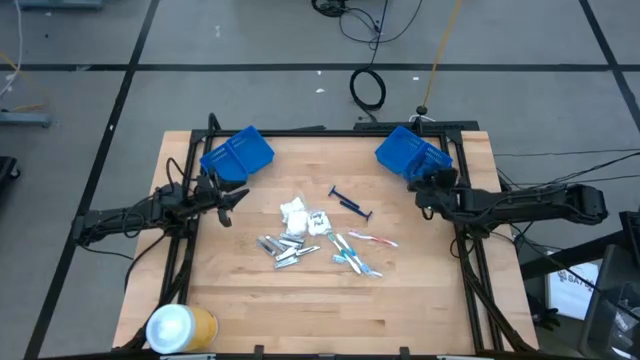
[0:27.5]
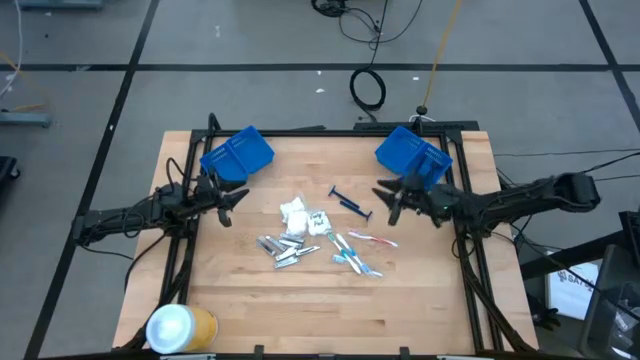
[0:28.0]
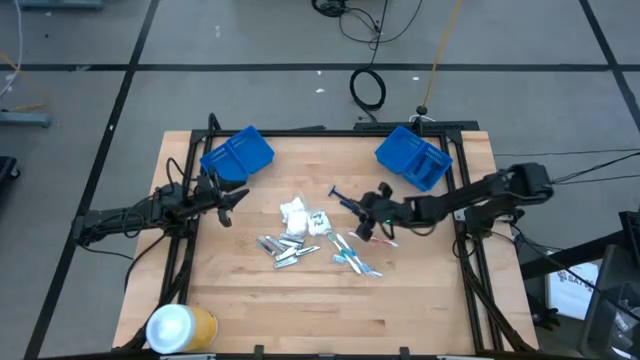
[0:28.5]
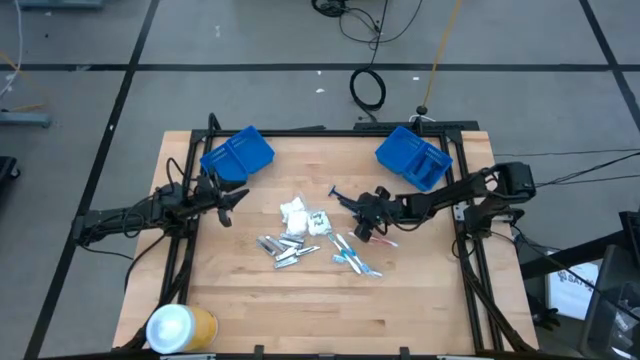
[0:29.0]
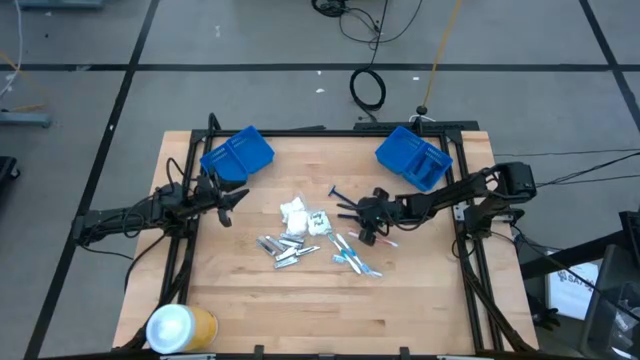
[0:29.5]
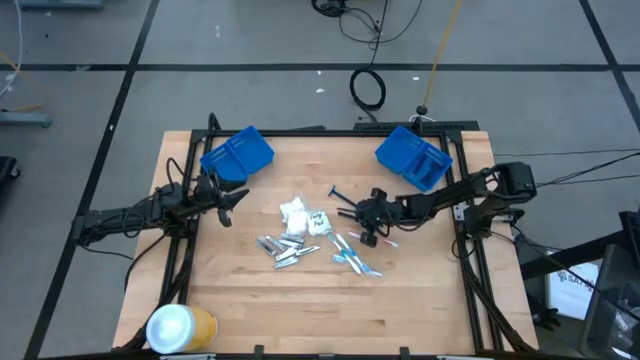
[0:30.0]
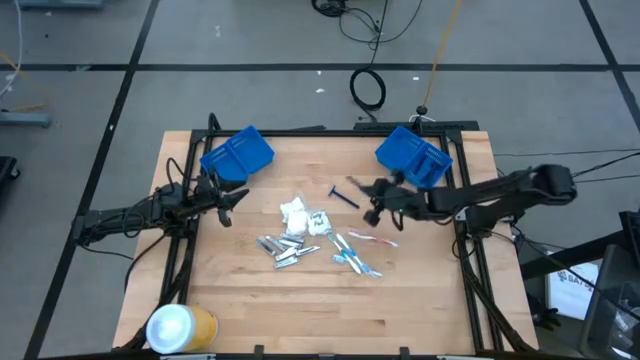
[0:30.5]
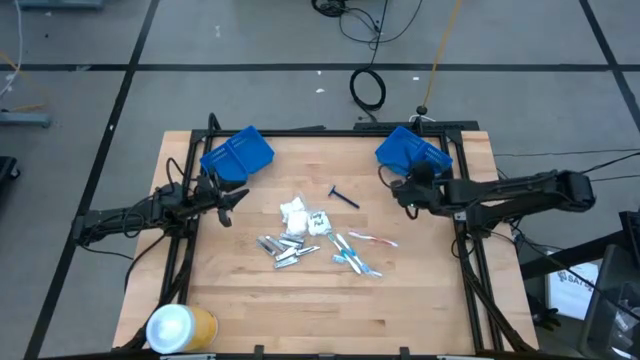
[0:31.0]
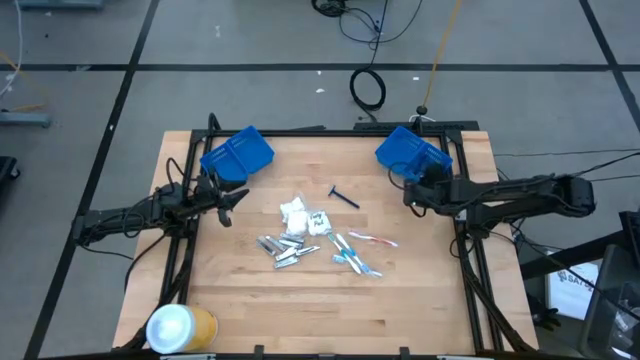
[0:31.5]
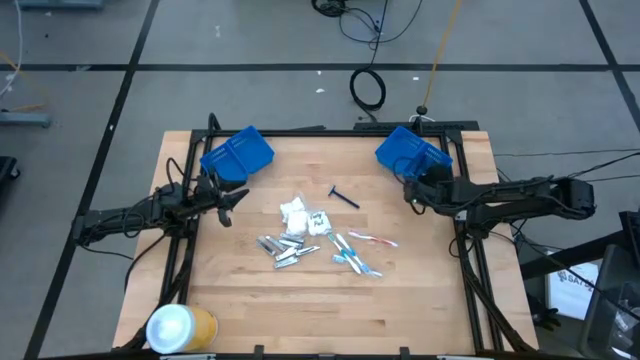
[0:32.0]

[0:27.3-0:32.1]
Task: Pick & Place Travel size toiletries
Put the blue razor into the right blue basket

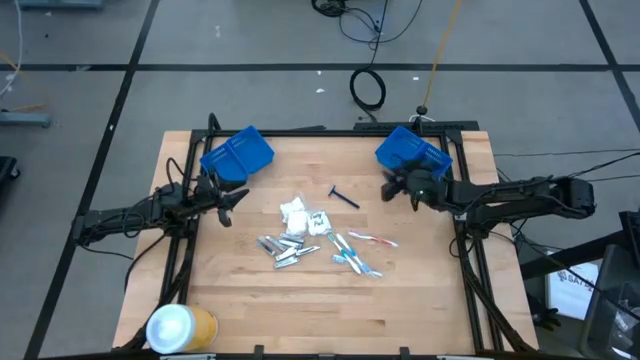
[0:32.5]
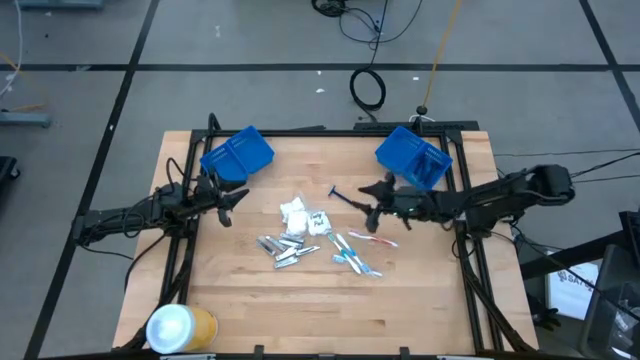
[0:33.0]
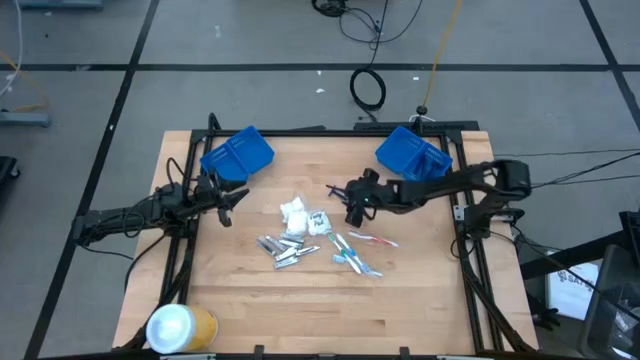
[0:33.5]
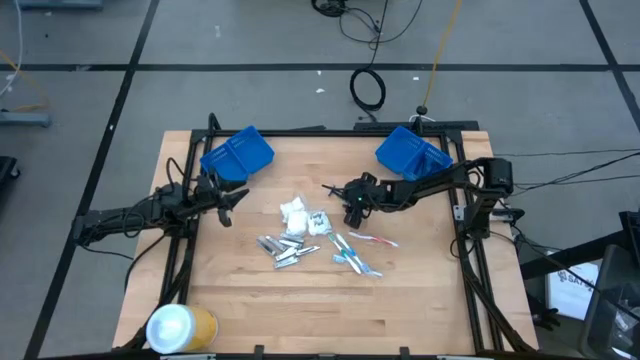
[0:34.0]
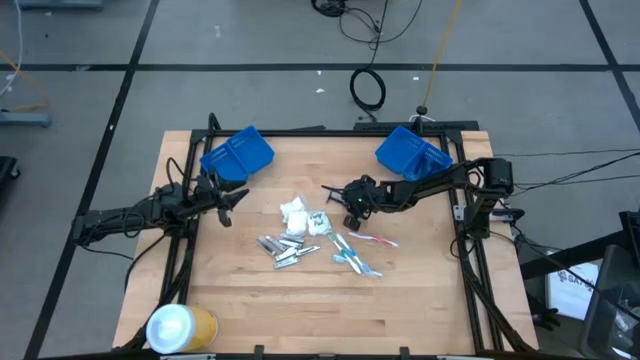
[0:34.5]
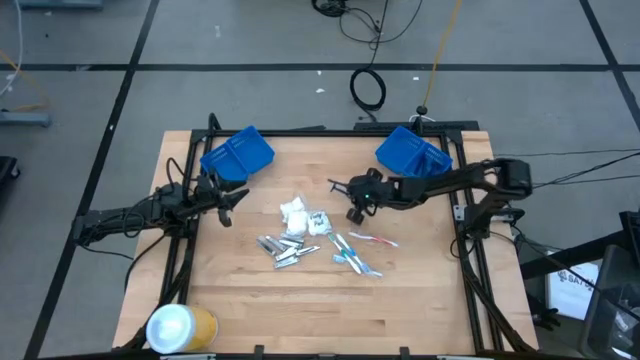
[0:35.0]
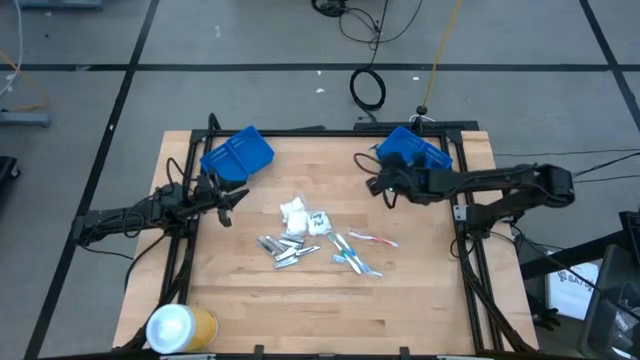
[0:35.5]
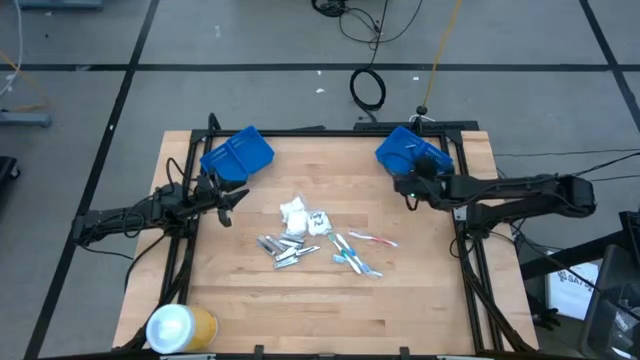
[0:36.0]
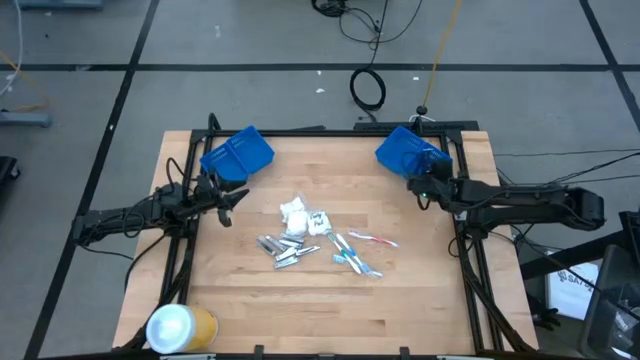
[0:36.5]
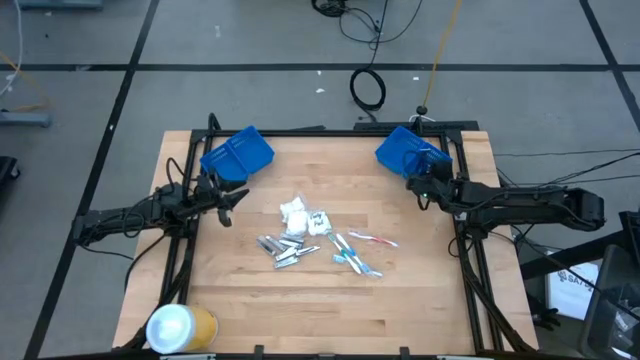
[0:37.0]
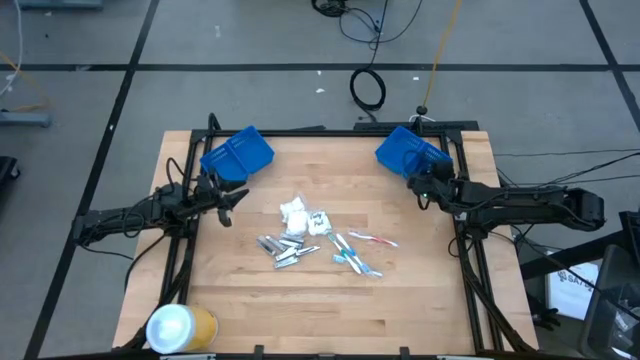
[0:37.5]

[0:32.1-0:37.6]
Put the blue razor into the right blue basket

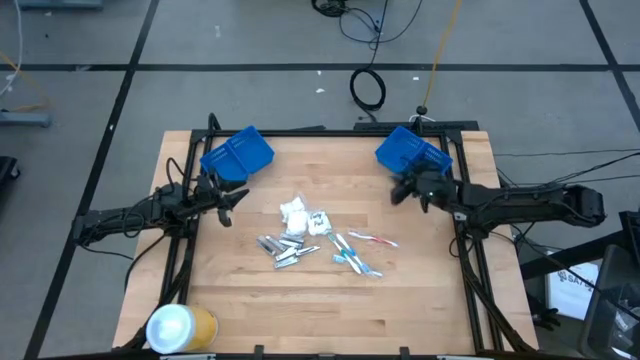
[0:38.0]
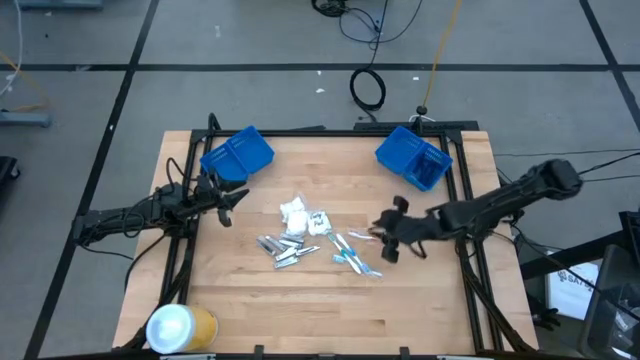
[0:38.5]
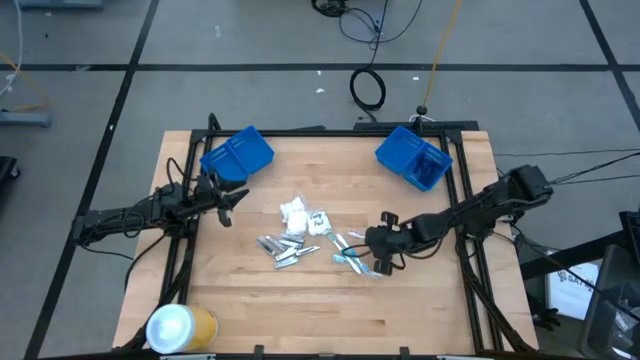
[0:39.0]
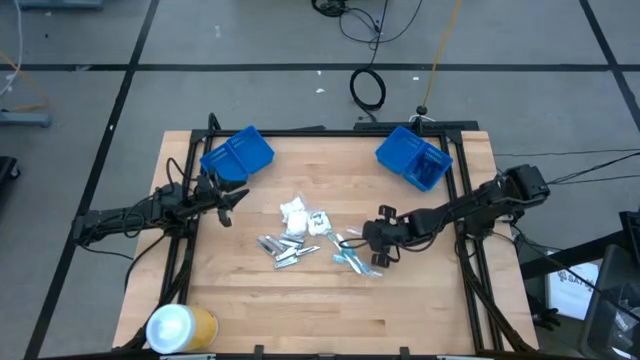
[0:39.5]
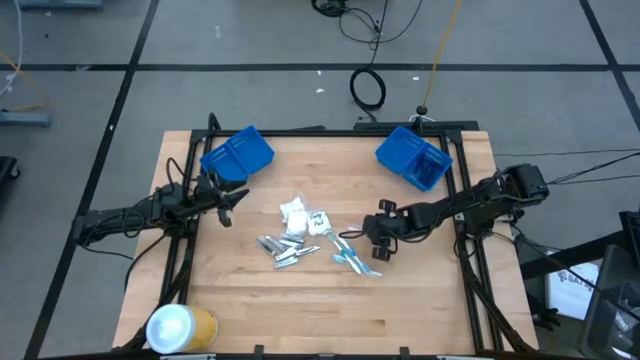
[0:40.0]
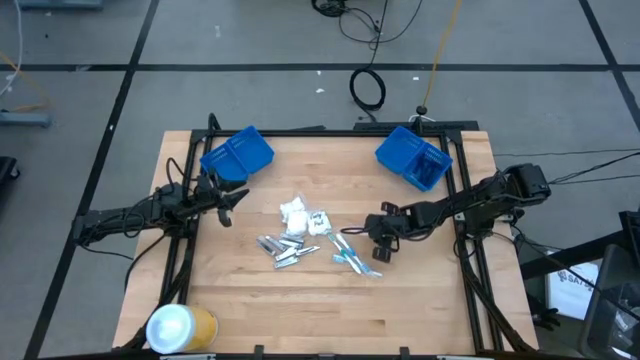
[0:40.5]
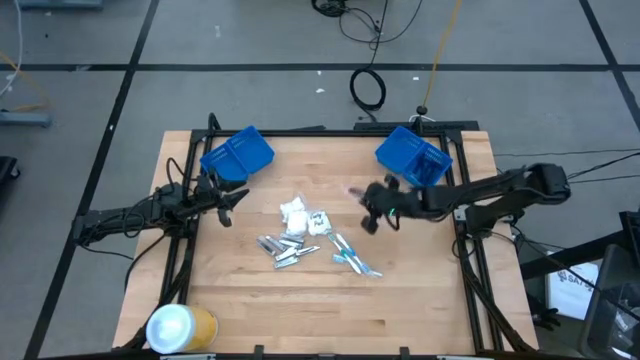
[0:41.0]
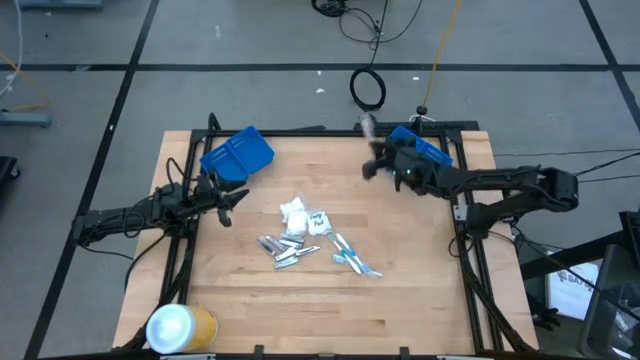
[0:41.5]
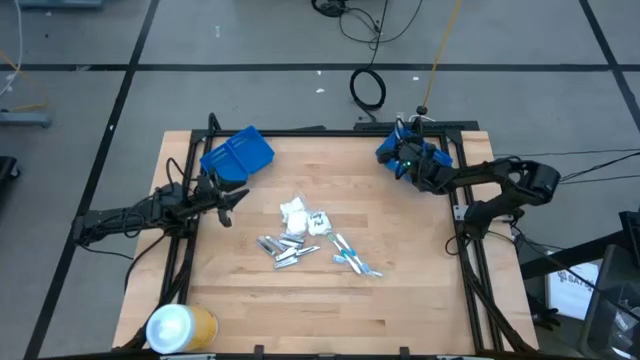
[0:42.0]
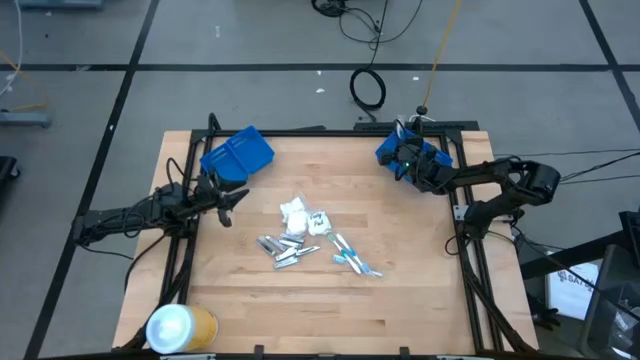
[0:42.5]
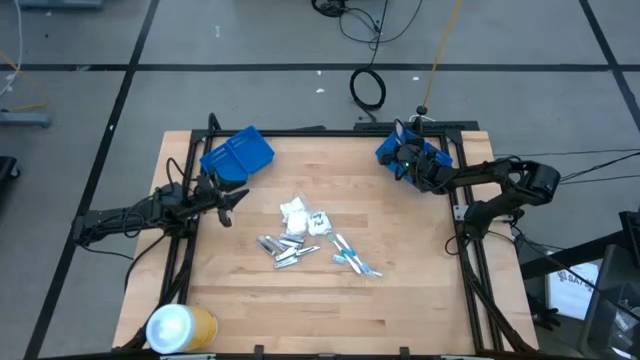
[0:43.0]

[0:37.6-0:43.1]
Put the red toothbrush into the middle right blue basket

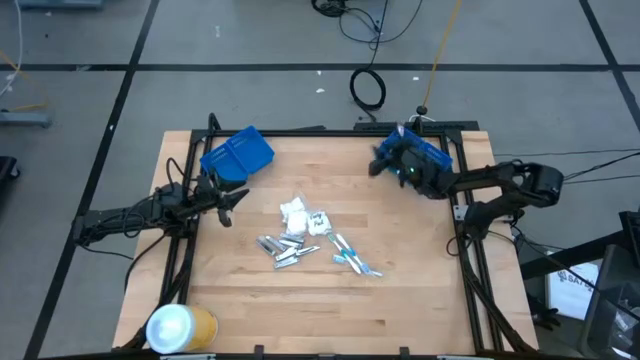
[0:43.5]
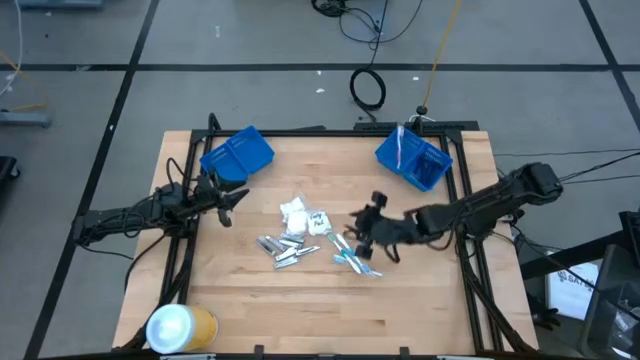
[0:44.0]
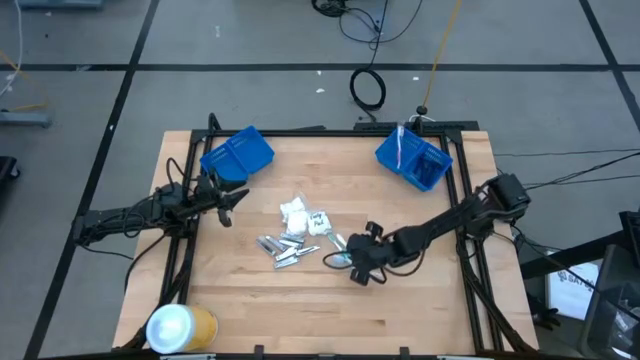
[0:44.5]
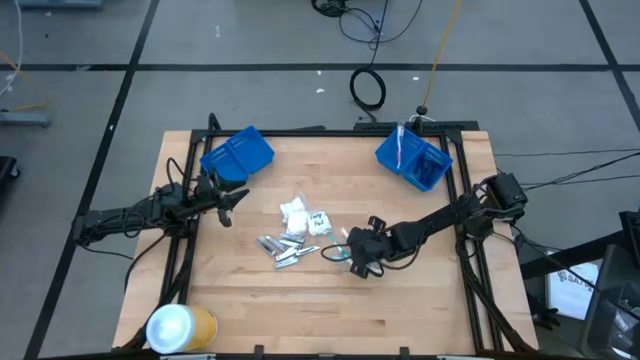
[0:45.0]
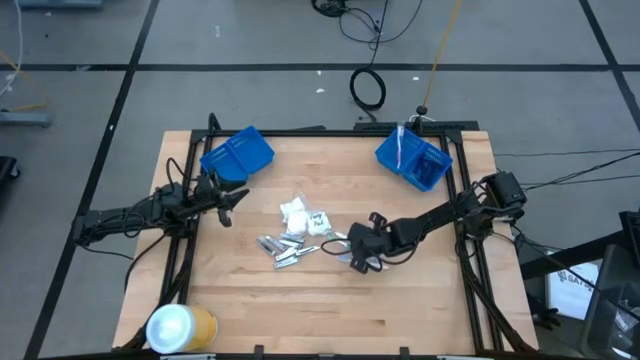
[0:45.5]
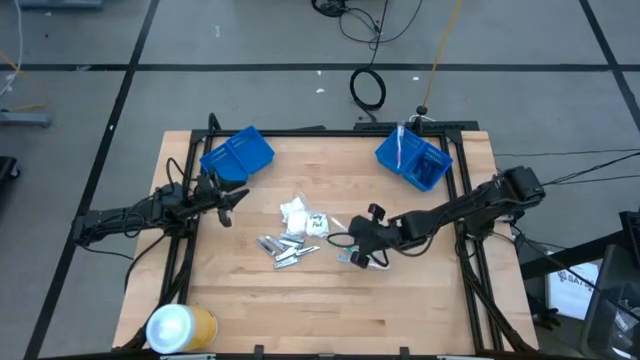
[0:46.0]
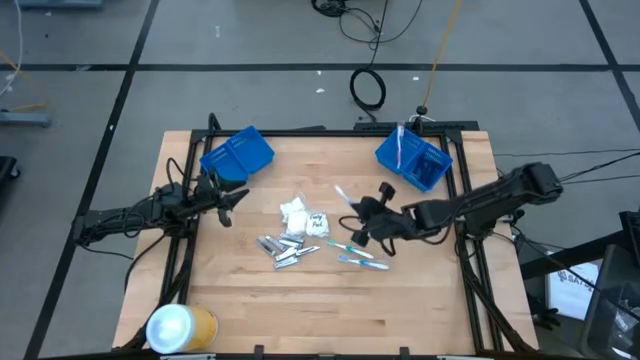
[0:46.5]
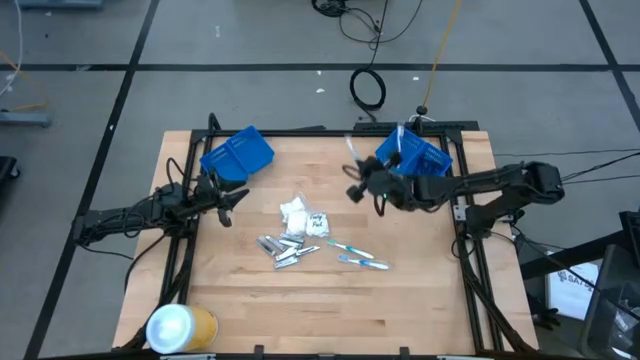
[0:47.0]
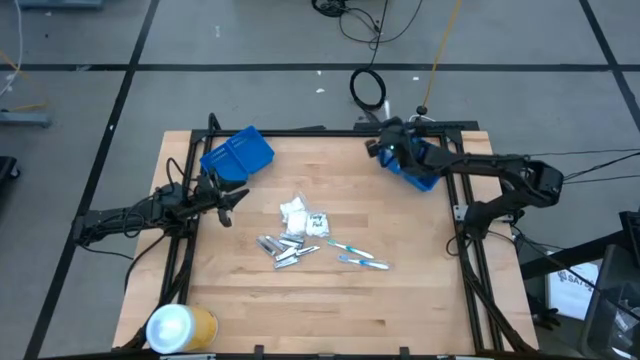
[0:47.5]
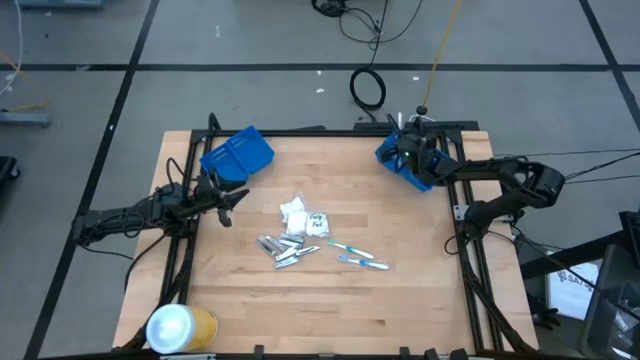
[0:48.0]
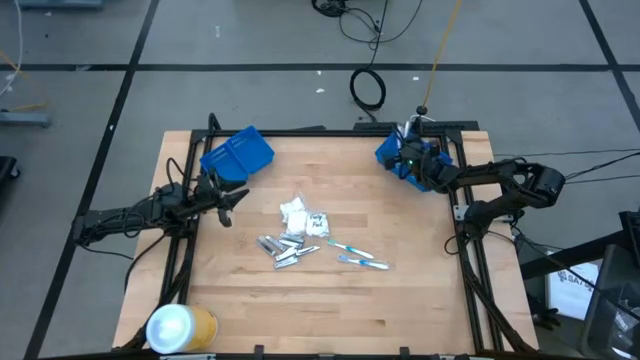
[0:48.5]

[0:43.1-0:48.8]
Put the blue toothbrush into the middle right blue basket
